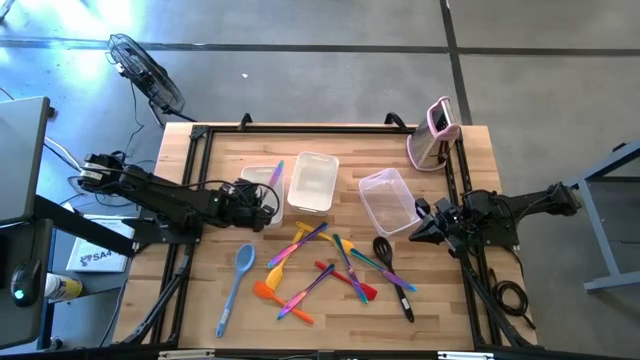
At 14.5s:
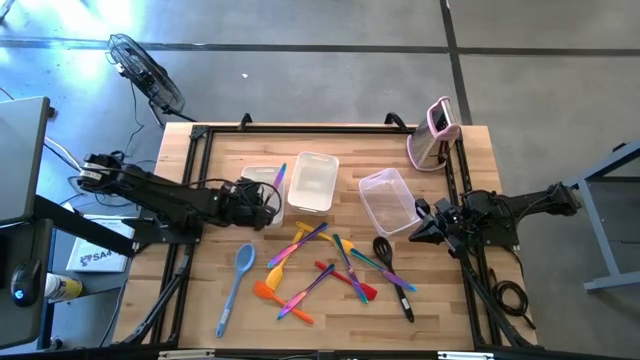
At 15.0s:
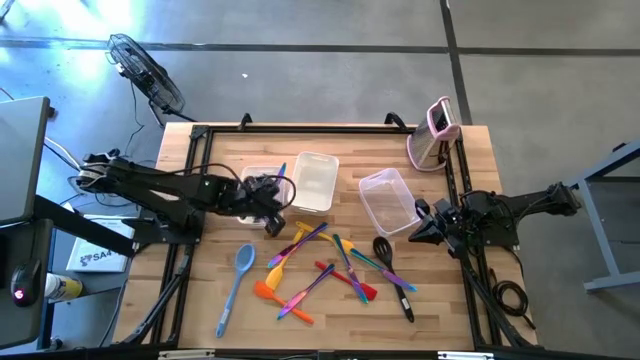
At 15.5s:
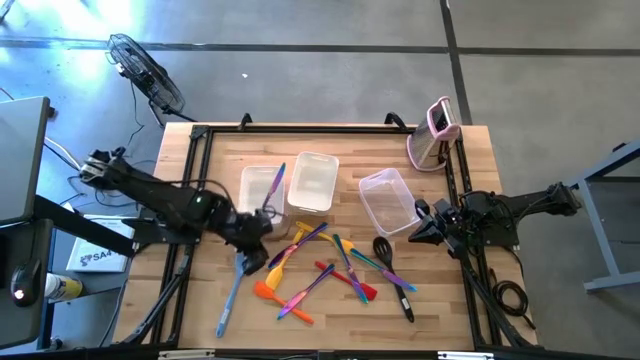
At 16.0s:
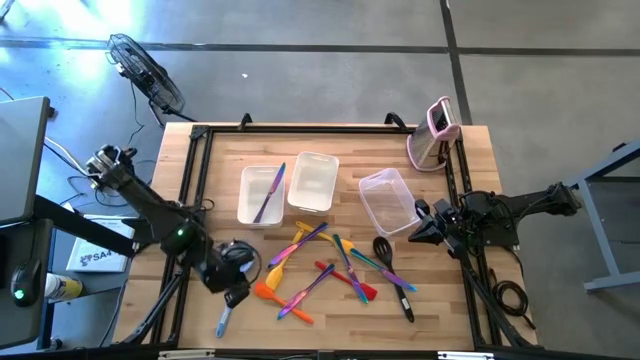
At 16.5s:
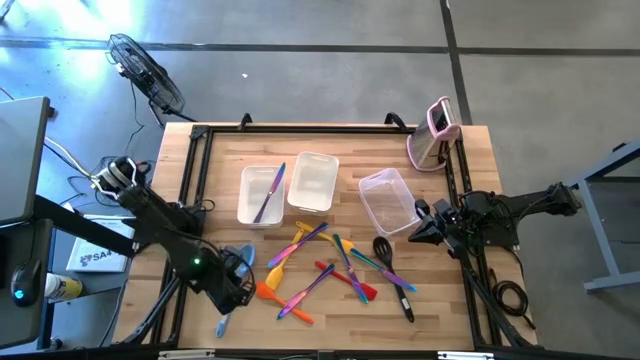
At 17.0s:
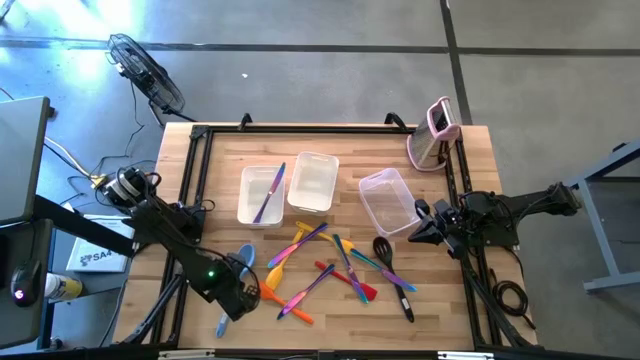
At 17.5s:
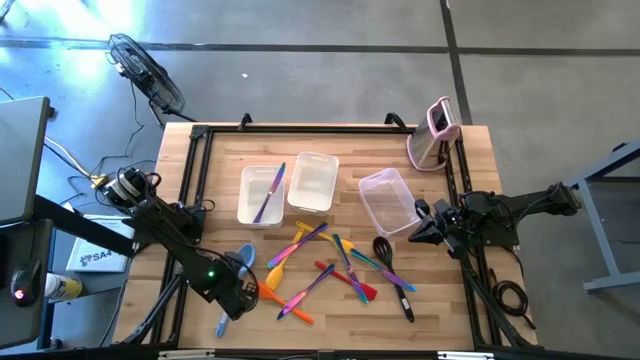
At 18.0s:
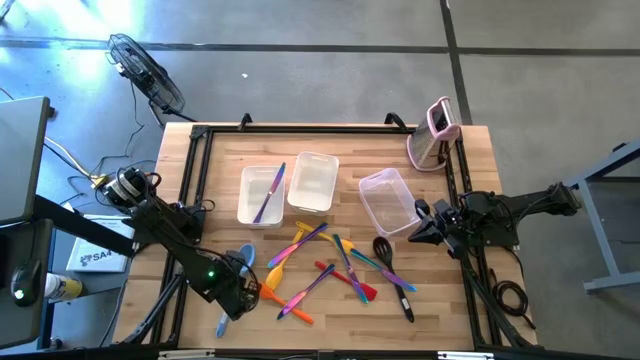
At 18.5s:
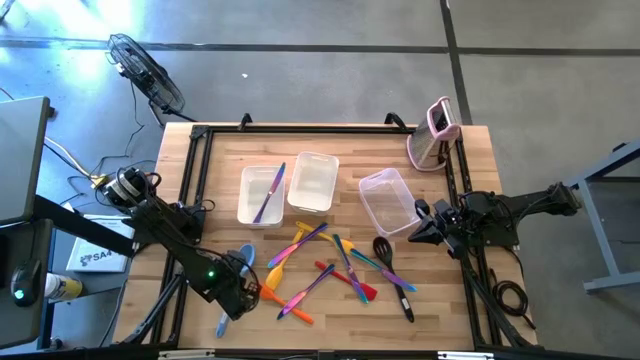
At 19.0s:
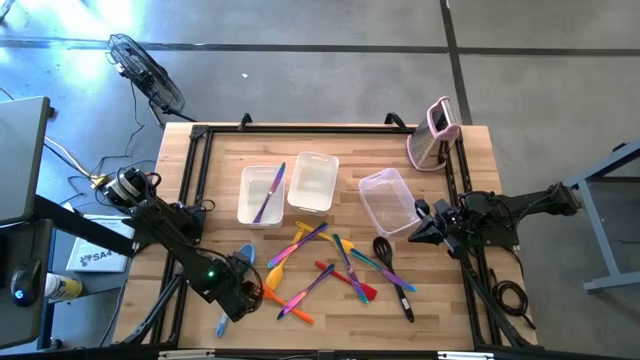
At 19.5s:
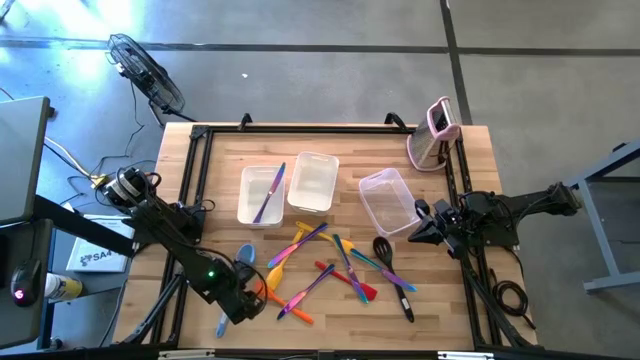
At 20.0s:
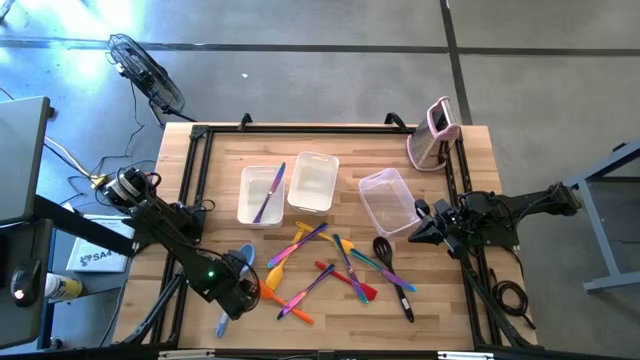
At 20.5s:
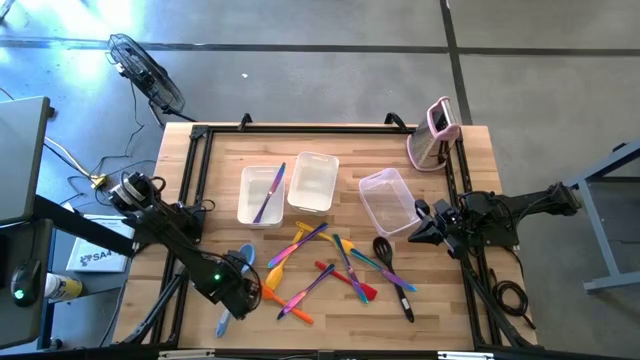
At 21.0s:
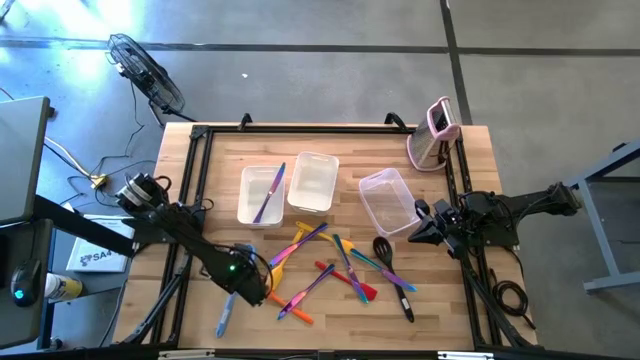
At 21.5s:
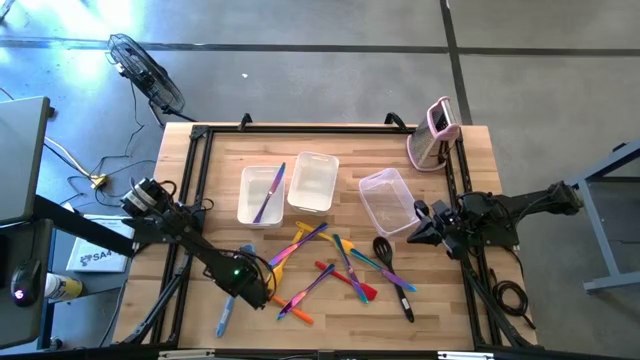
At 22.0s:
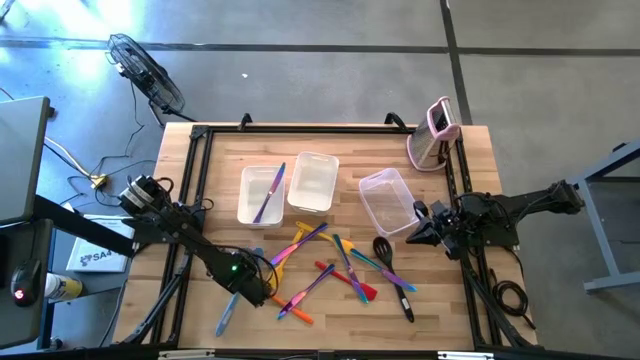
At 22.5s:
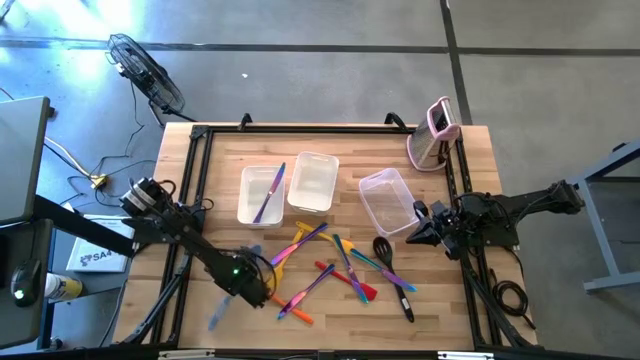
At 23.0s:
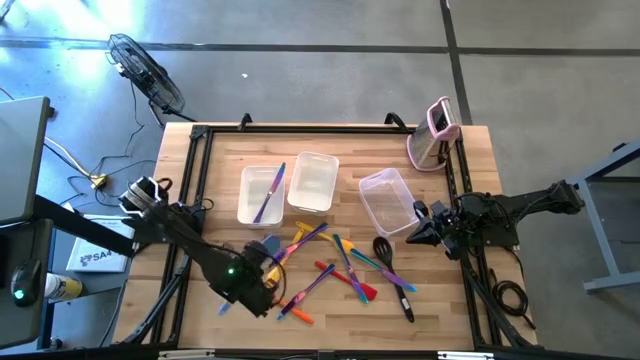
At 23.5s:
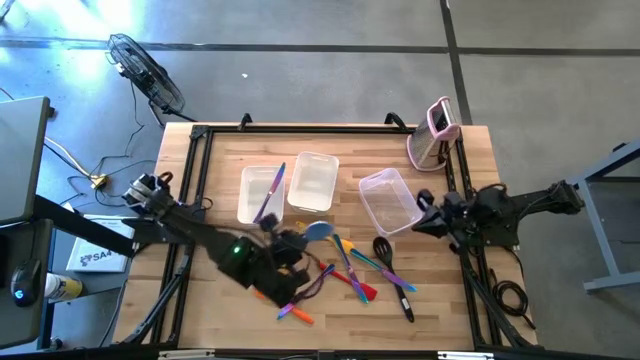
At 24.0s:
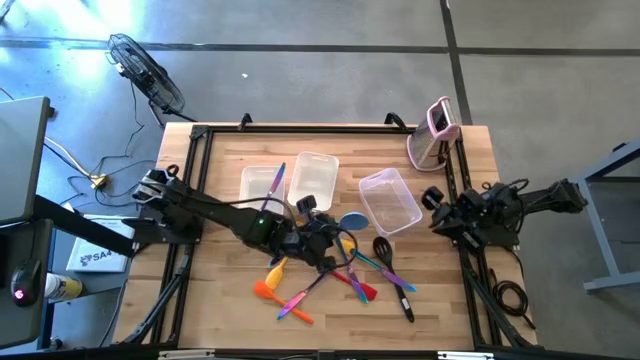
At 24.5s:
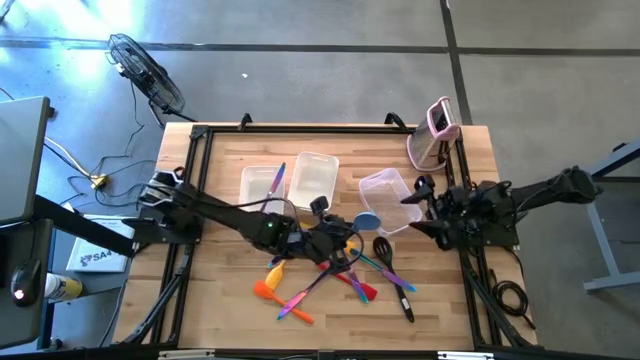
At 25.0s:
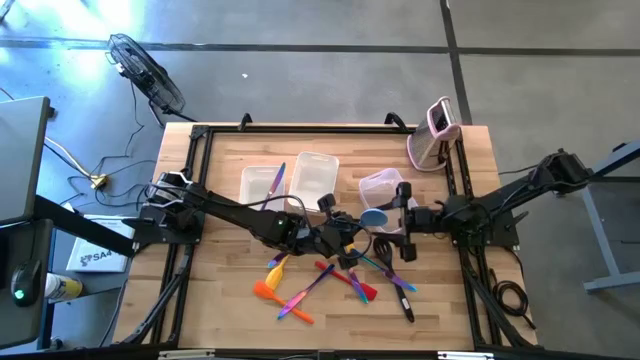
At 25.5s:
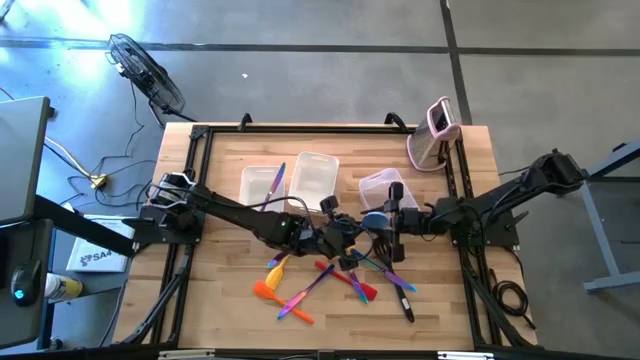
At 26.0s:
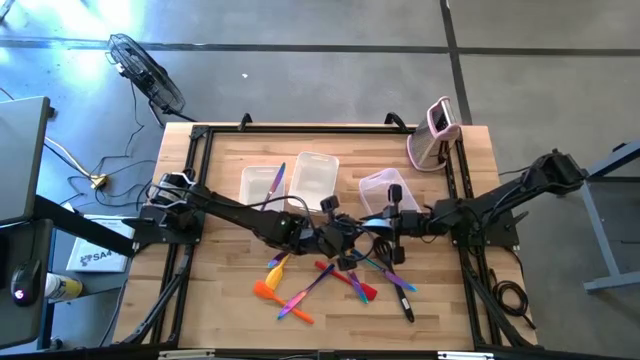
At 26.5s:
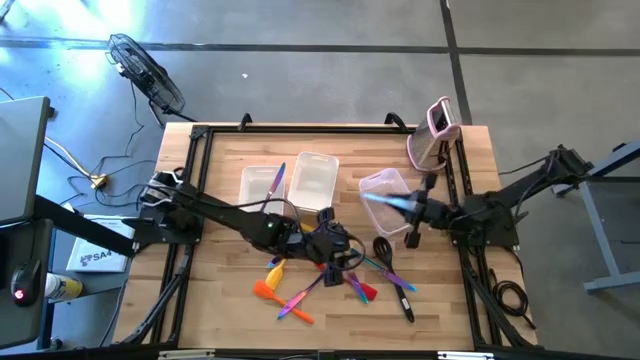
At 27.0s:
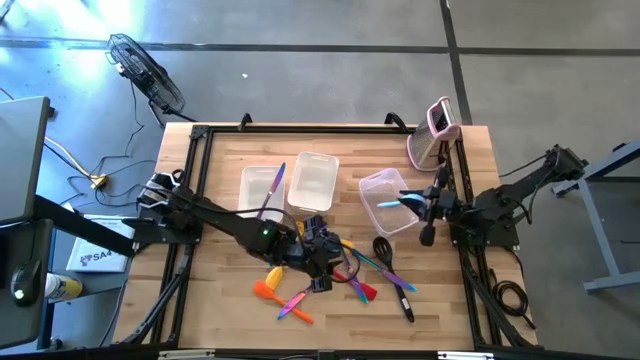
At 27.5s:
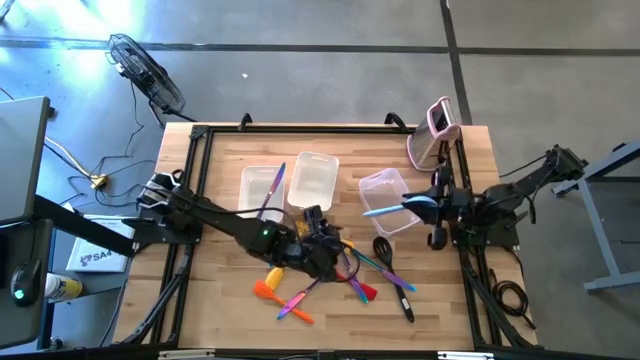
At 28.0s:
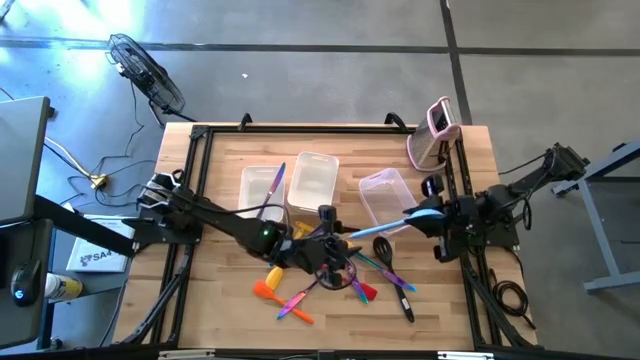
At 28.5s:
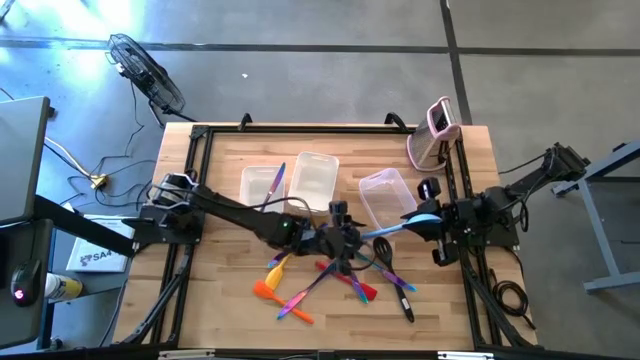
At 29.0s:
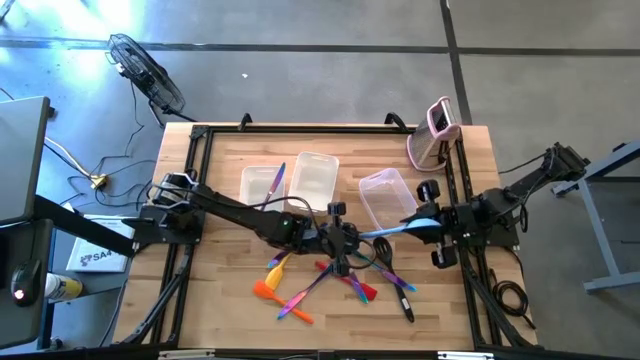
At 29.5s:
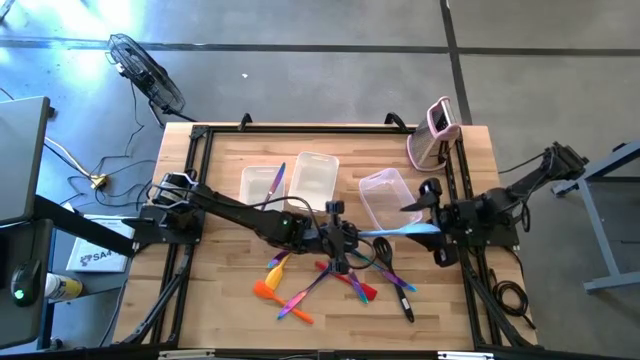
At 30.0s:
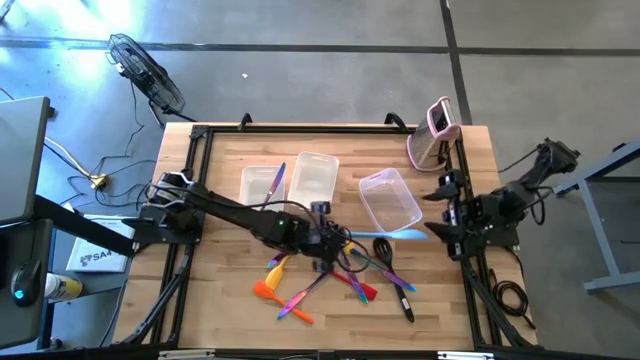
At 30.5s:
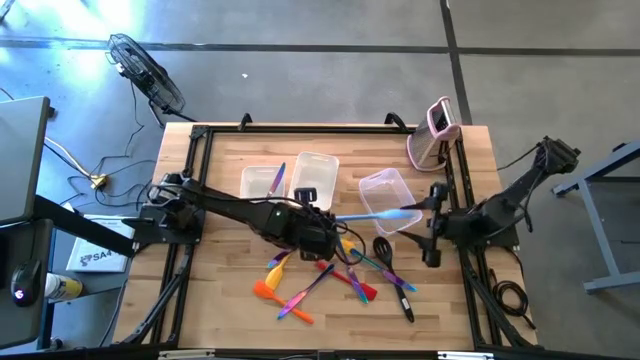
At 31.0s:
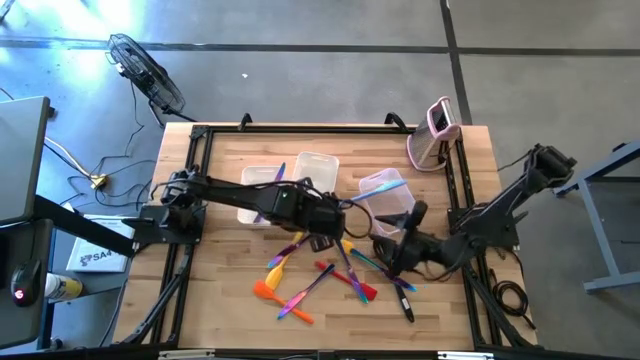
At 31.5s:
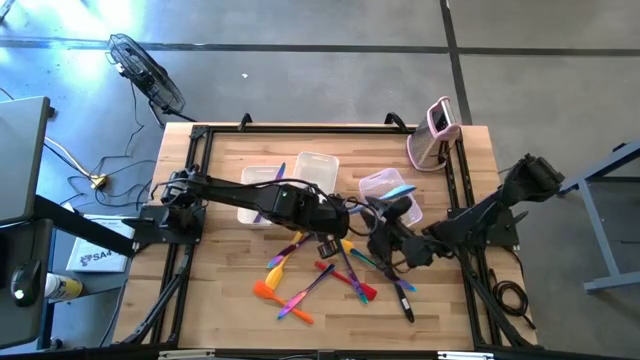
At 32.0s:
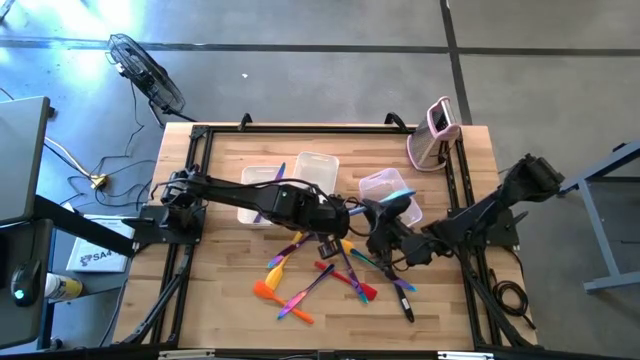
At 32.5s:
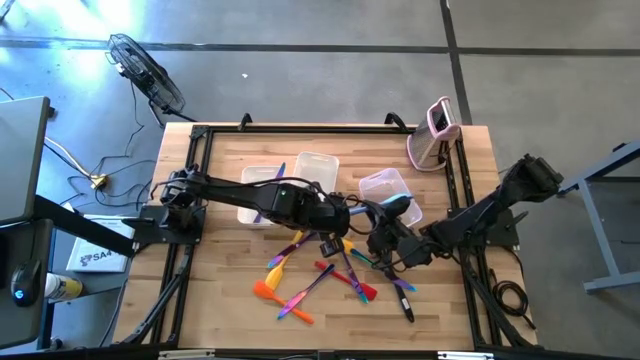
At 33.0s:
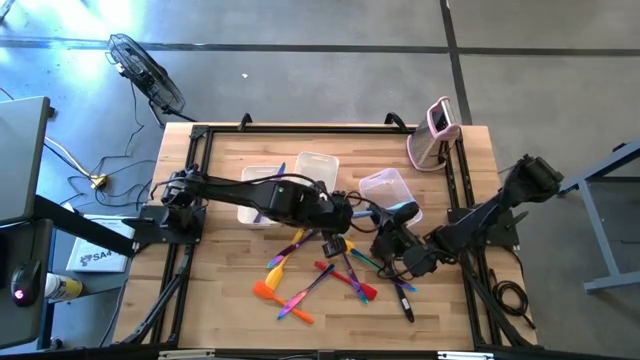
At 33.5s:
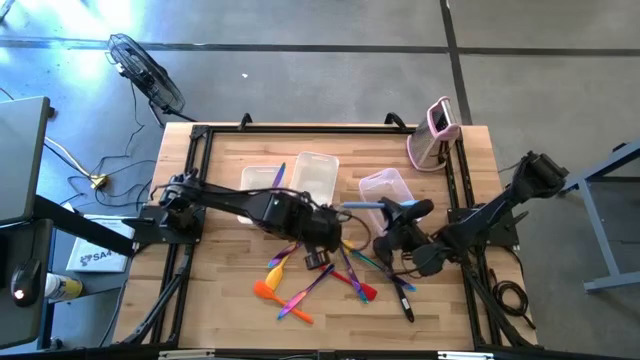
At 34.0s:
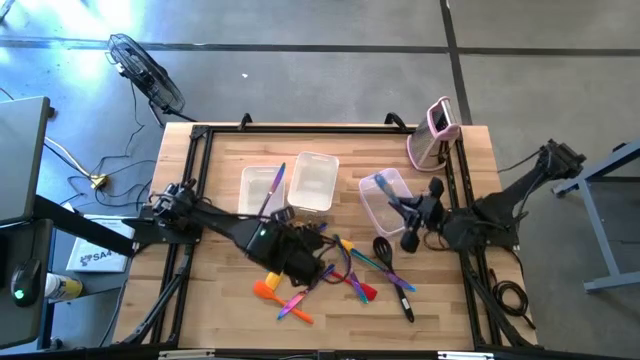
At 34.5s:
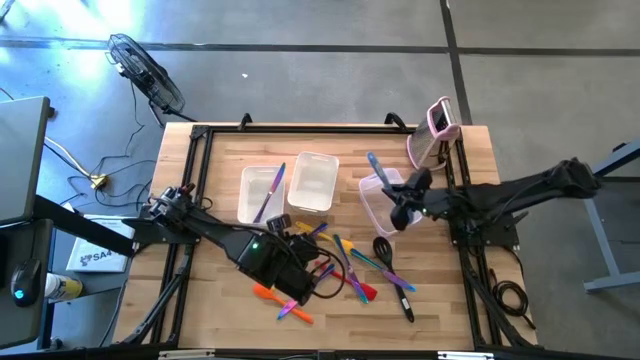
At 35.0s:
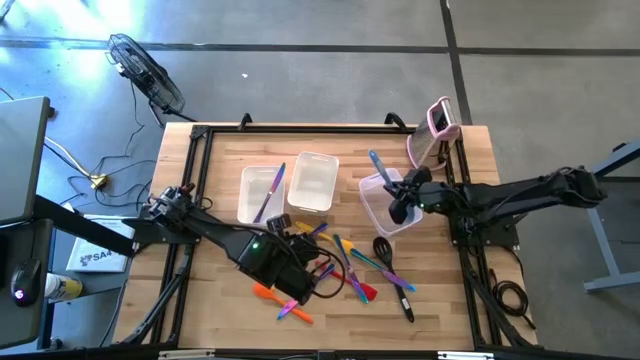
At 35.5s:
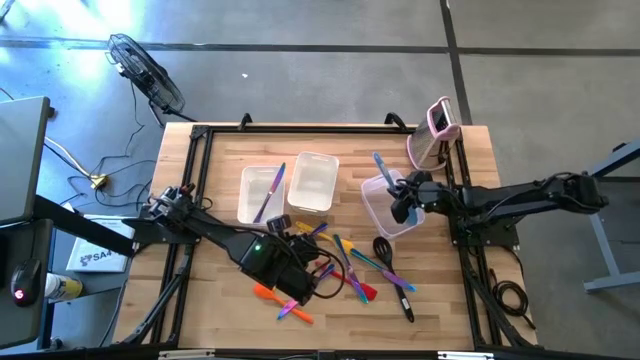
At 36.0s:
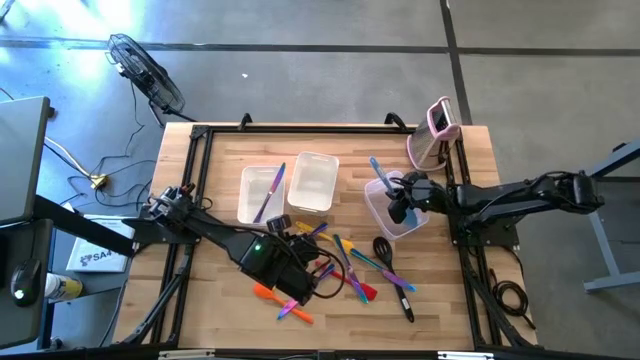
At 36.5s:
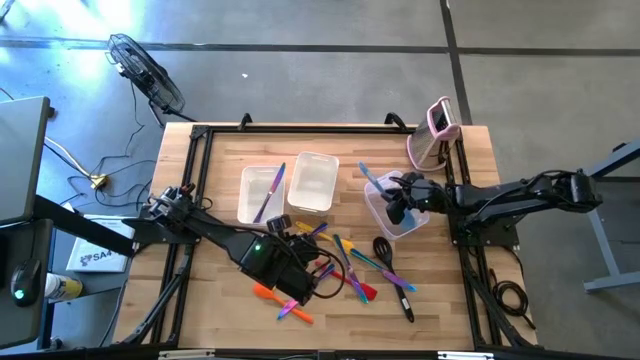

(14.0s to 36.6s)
Task: Pick & Place Kitchen Items
Put the blue serving spoon into the transparent bin
